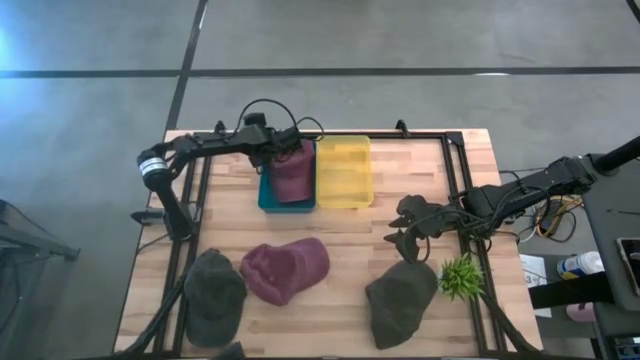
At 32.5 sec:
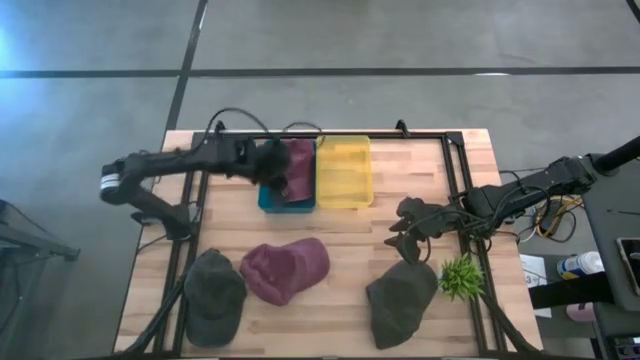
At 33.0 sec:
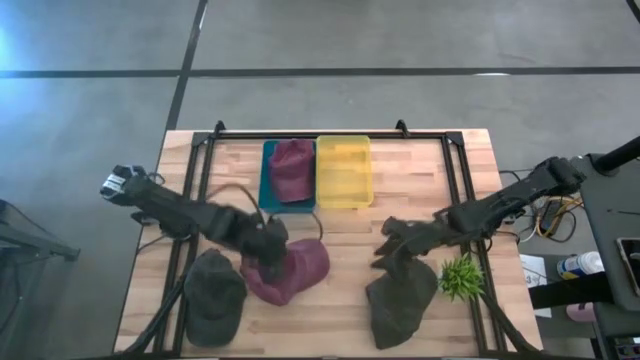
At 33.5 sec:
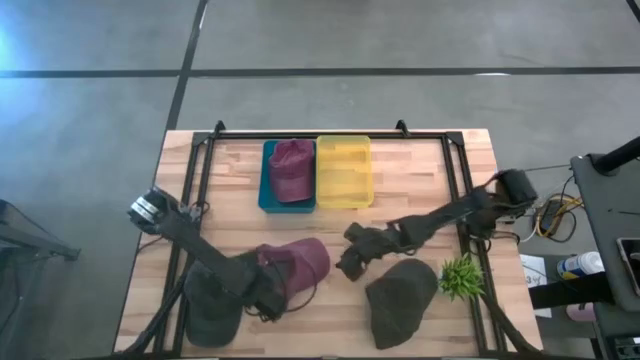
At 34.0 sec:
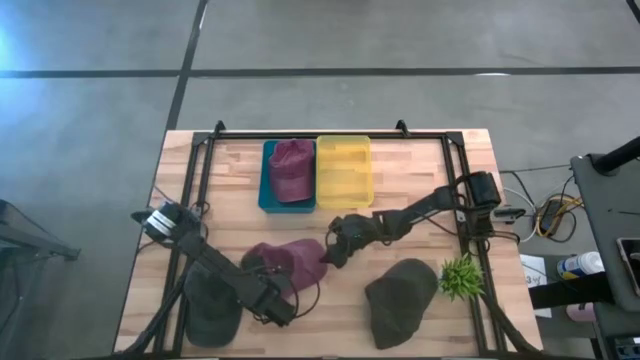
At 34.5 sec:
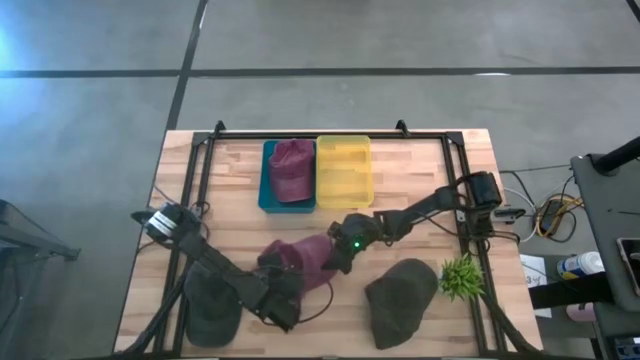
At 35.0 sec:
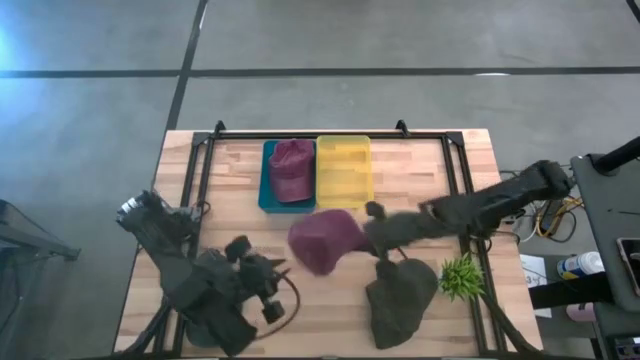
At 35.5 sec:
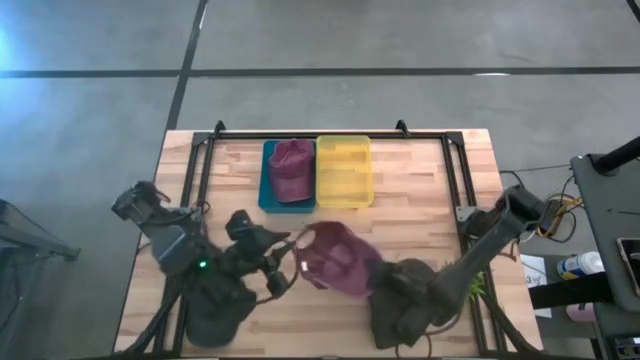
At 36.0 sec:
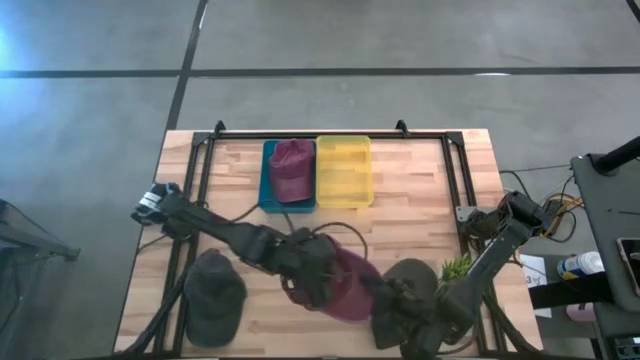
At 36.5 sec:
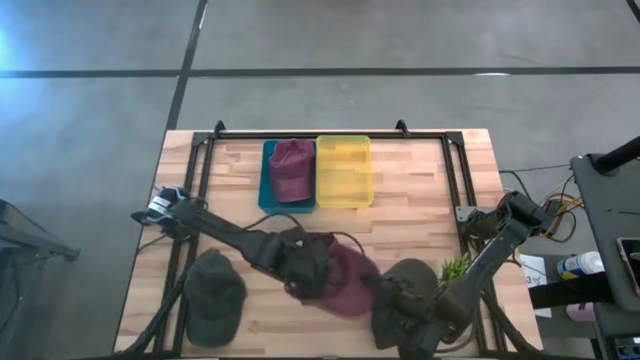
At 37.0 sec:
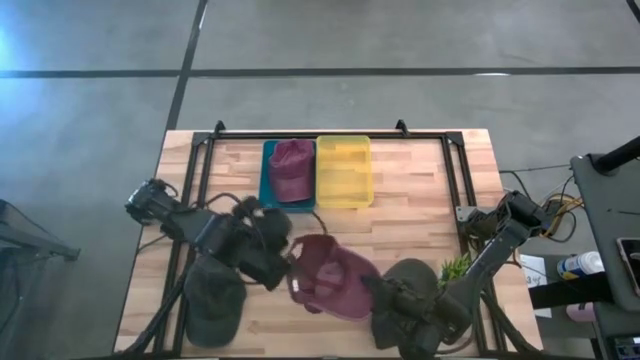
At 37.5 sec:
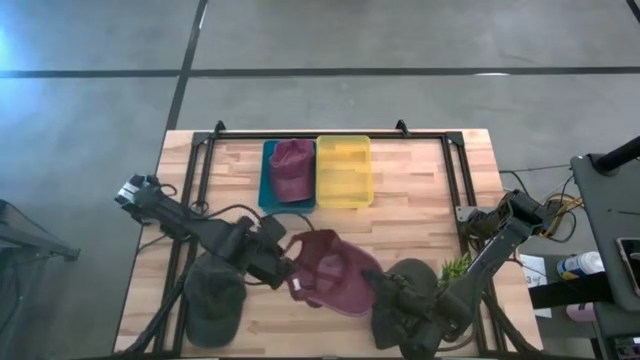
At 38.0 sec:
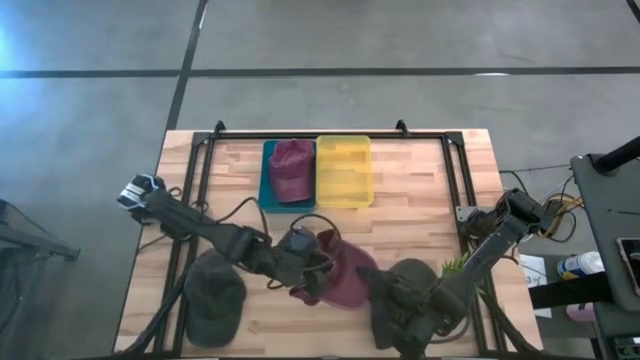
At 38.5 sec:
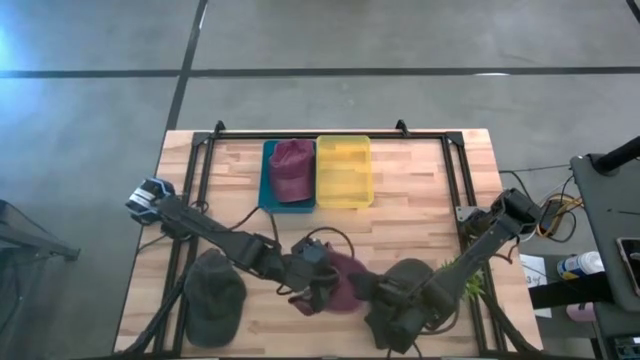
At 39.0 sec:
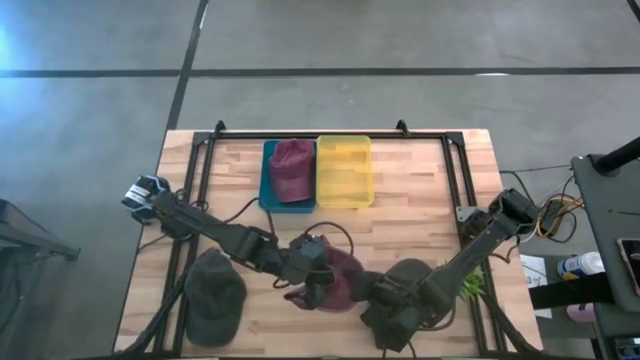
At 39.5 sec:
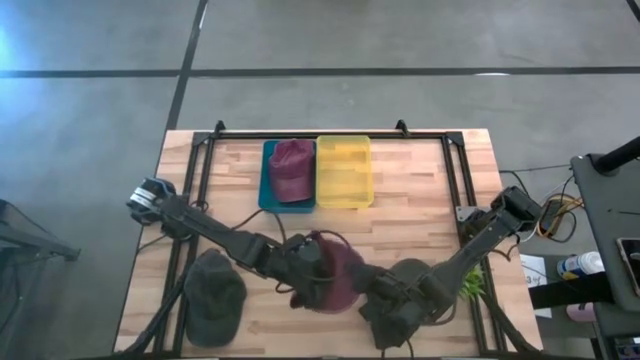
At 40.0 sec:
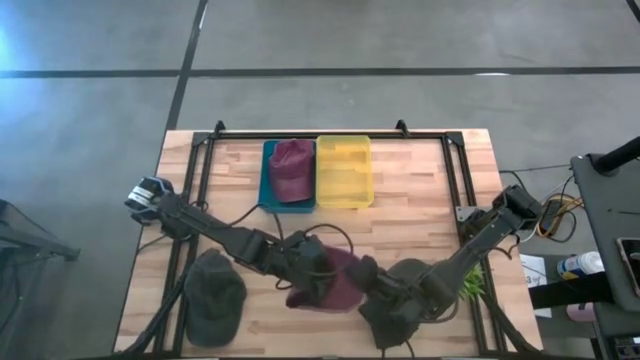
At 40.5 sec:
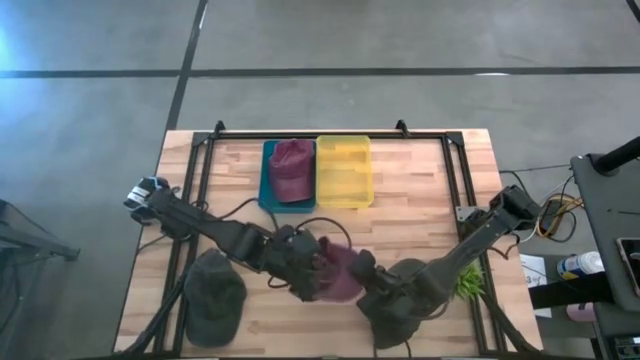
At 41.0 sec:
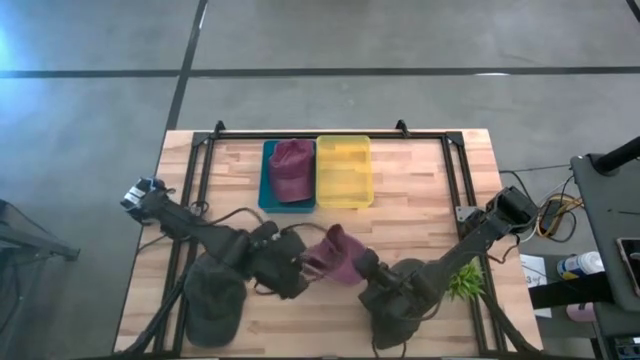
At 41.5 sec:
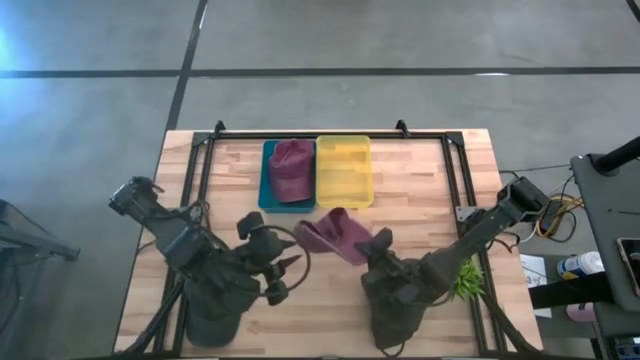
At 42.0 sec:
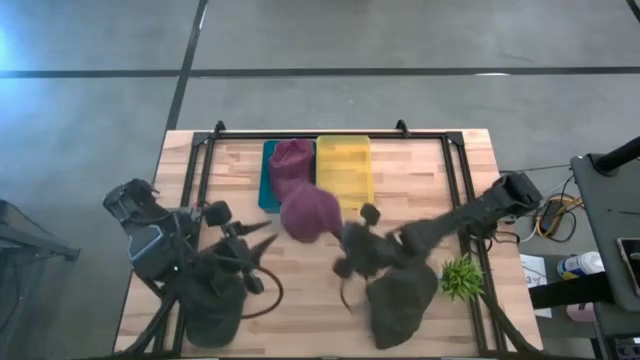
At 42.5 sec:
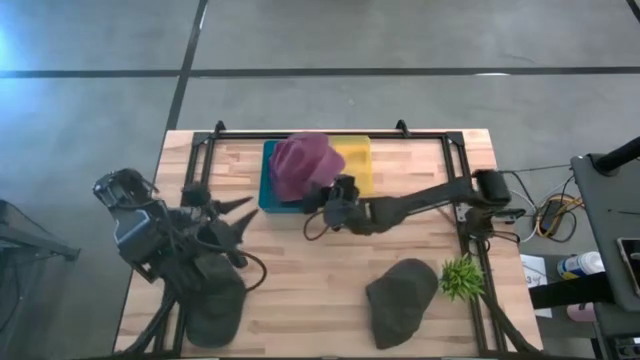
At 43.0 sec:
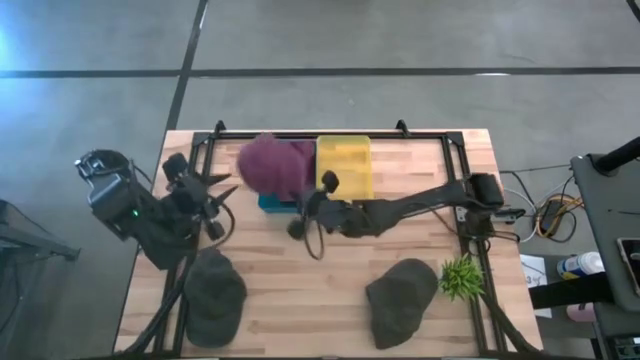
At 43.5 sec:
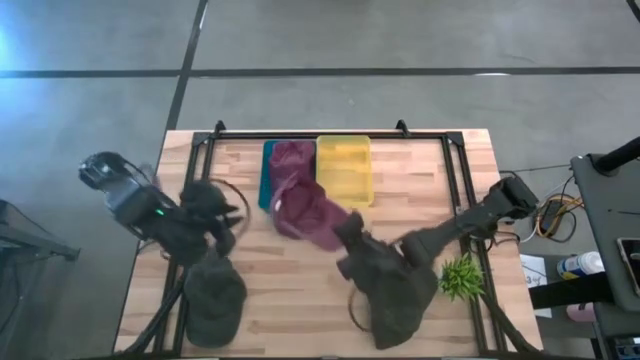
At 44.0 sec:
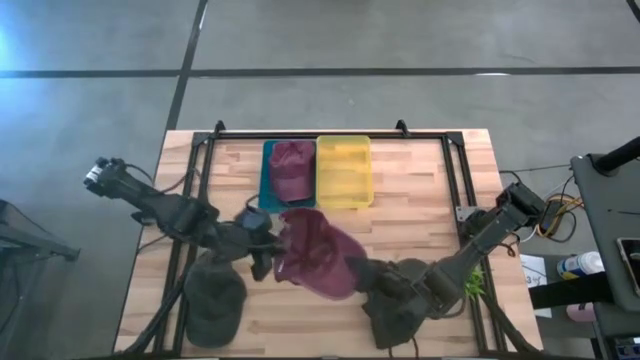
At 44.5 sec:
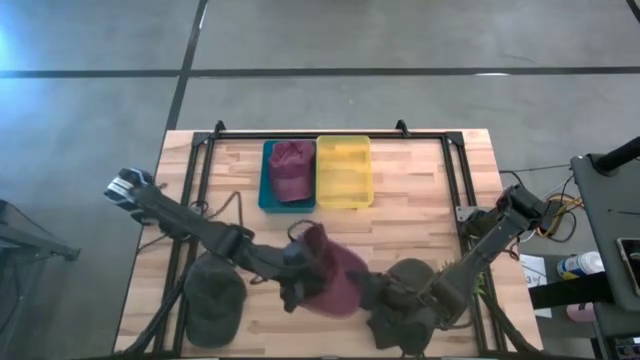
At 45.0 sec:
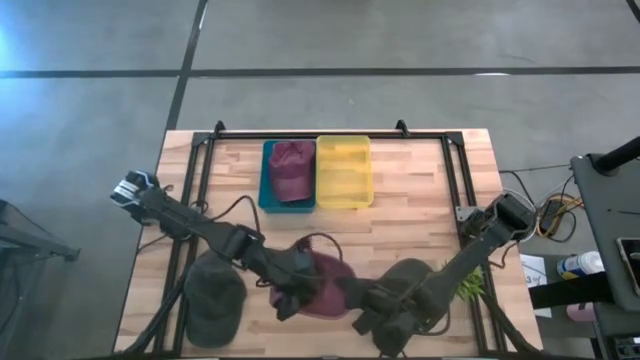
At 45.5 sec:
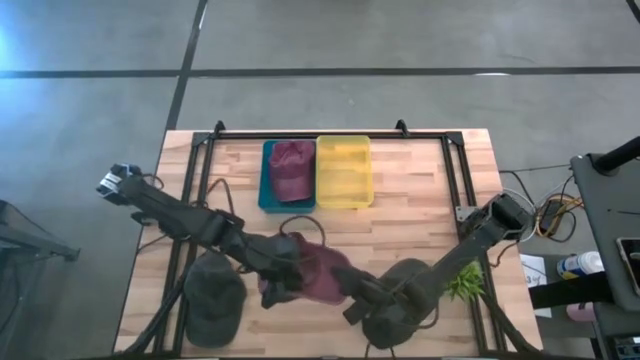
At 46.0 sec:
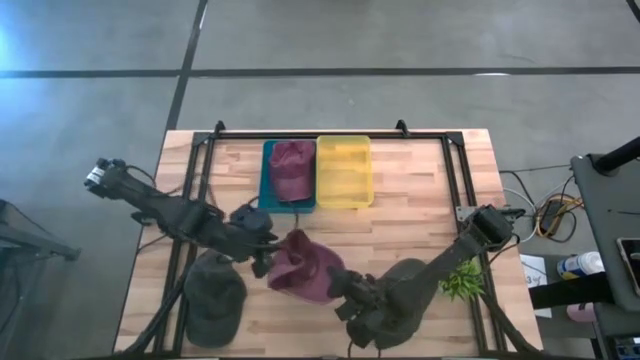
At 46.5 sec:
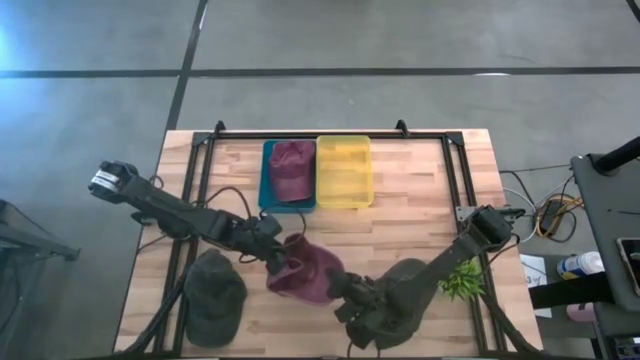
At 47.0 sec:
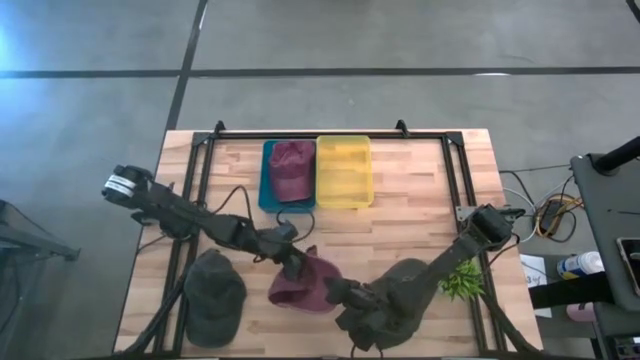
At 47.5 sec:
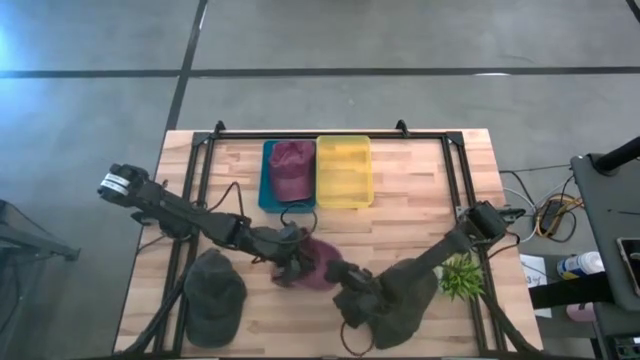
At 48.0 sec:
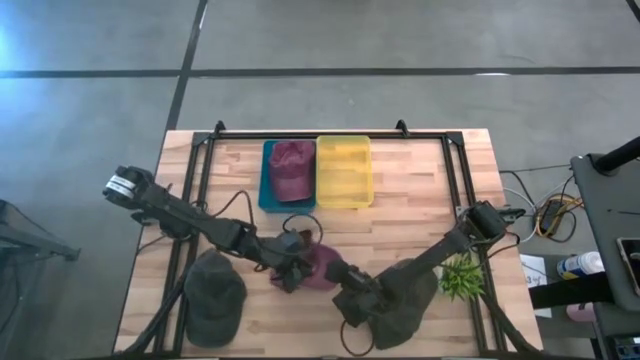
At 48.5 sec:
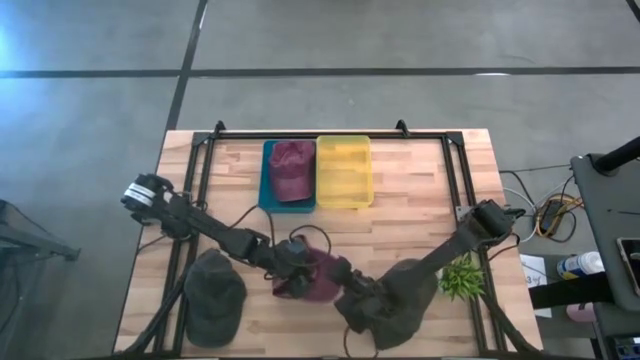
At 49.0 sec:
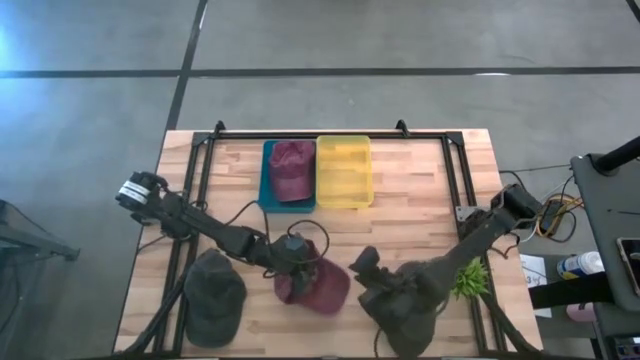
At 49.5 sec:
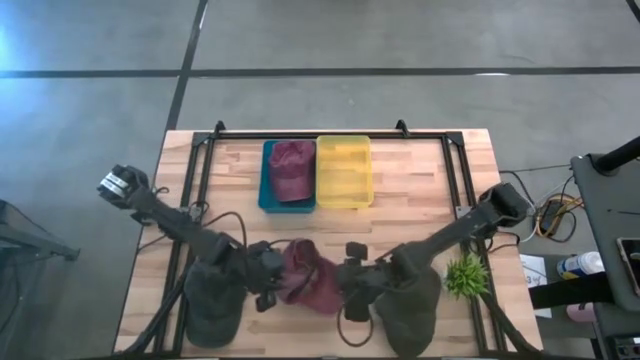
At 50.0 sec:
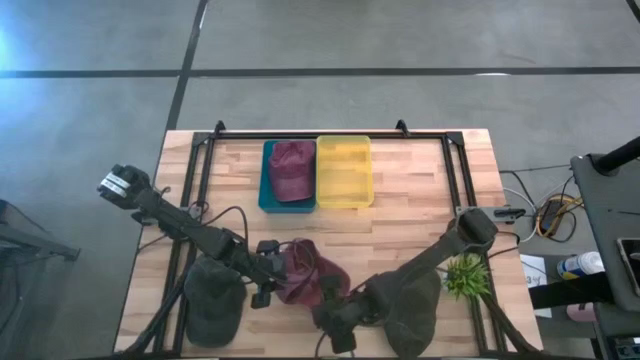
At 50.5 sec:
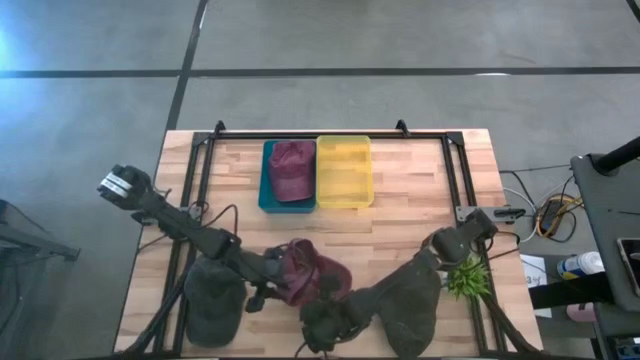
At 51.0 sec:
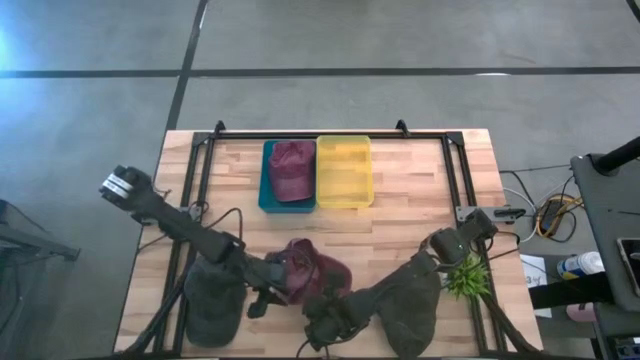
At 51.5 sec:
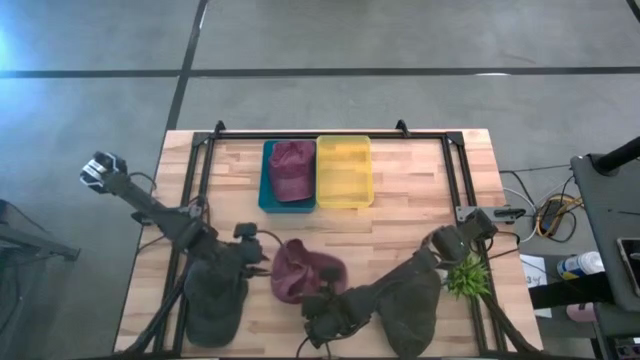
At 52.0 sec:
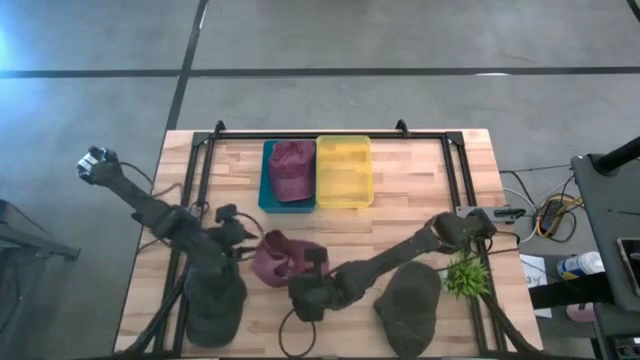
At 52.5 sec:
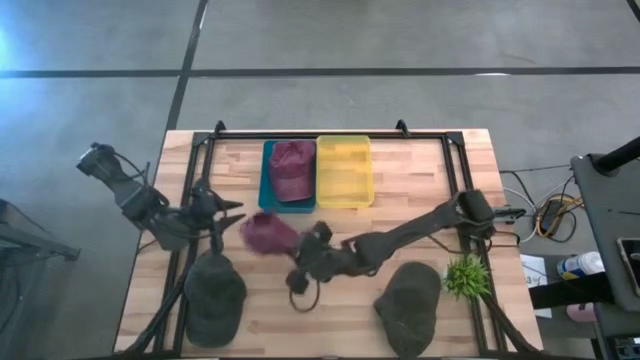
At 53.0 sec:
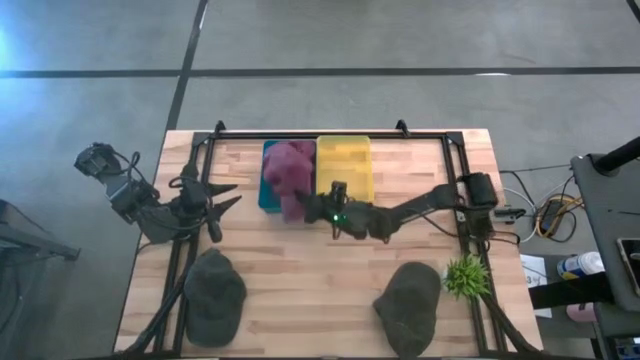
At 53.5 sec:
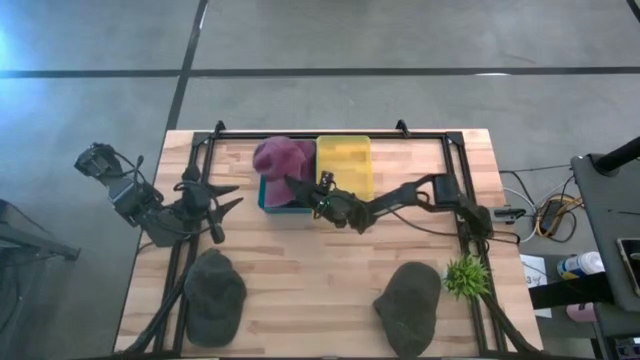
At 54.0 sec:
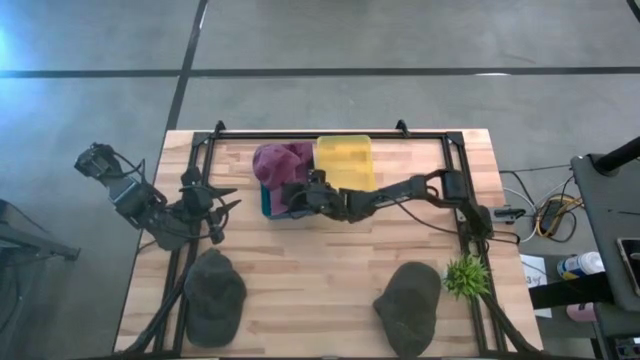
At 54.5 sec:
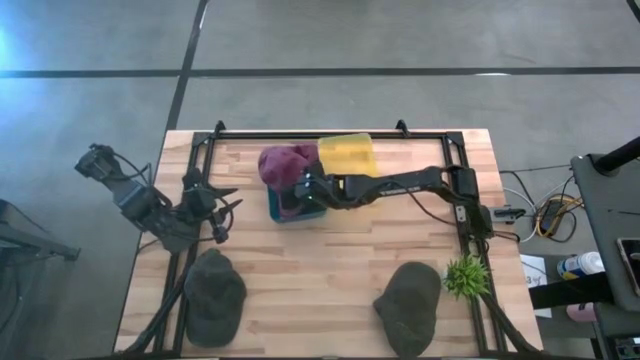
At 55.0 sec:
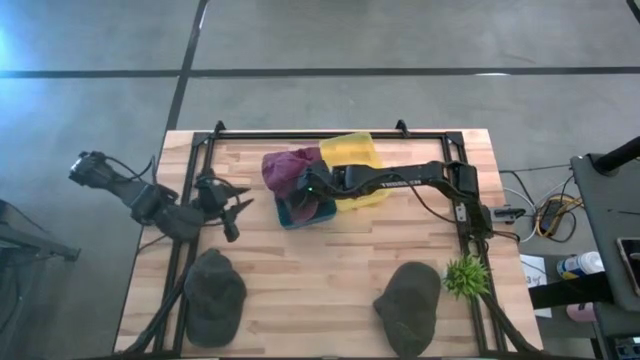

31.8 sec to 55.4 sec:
Task: Pick & Place hat
Put the pink cap into the blue bin
